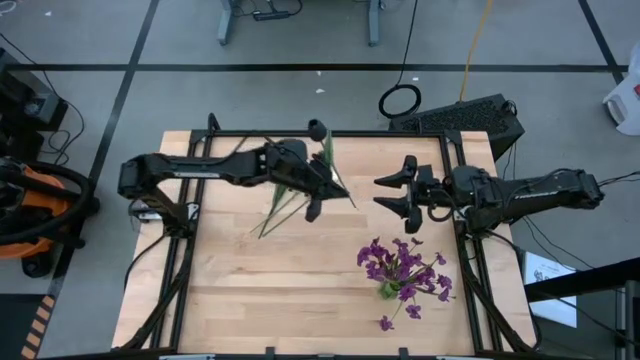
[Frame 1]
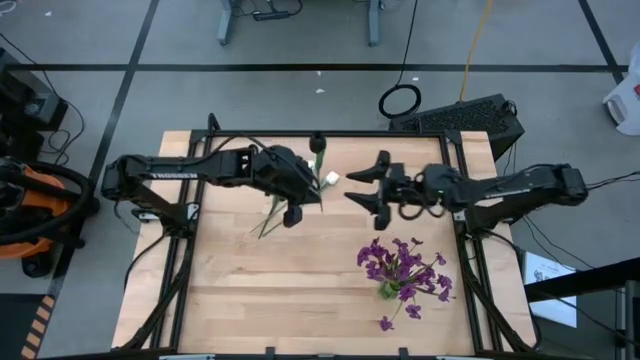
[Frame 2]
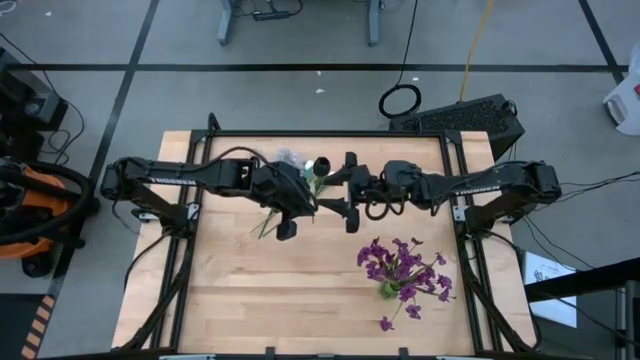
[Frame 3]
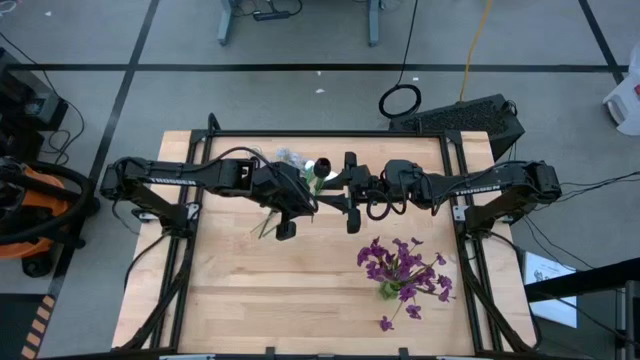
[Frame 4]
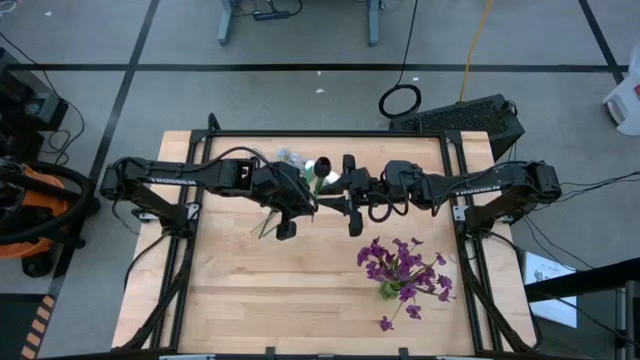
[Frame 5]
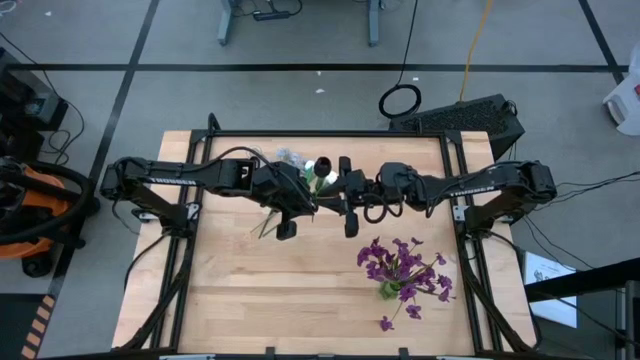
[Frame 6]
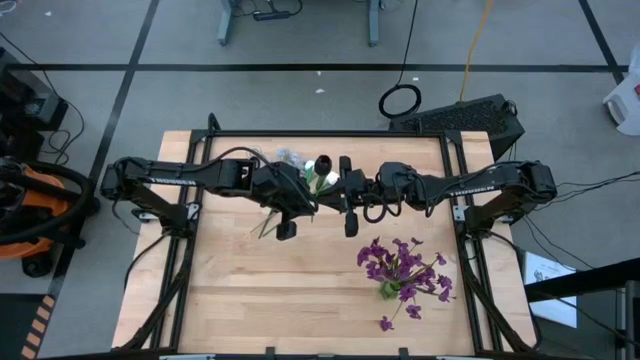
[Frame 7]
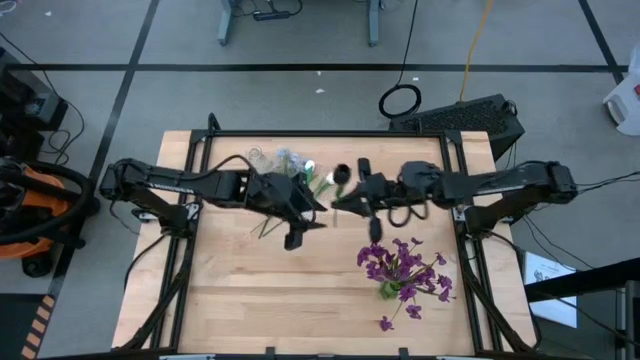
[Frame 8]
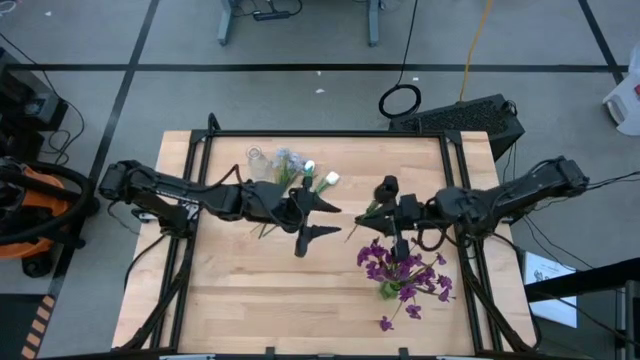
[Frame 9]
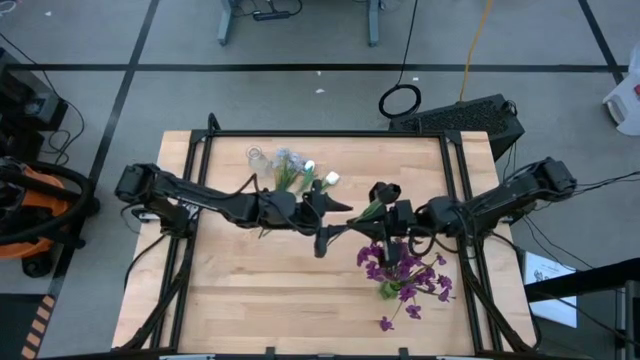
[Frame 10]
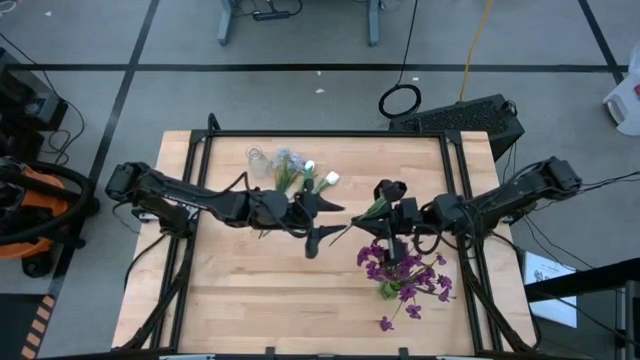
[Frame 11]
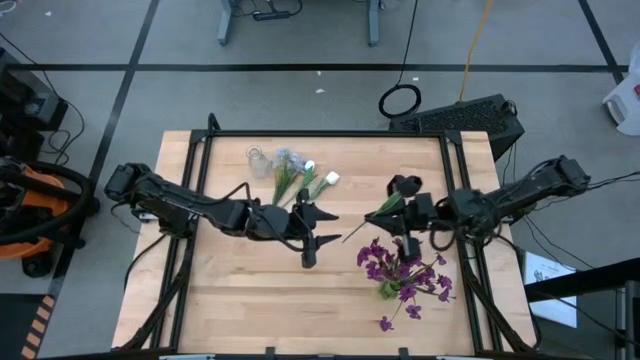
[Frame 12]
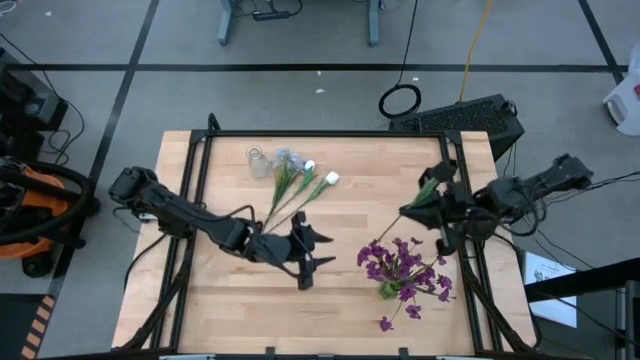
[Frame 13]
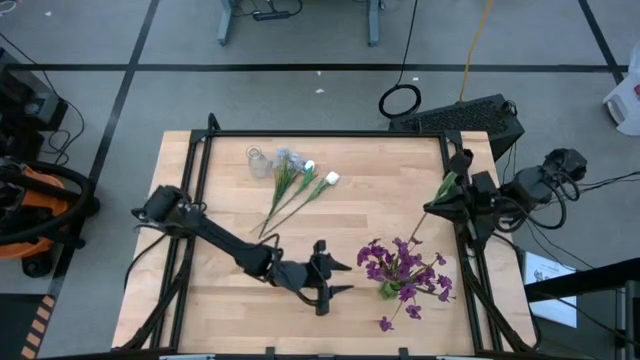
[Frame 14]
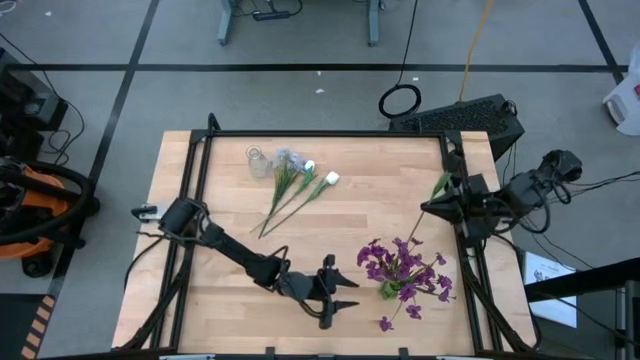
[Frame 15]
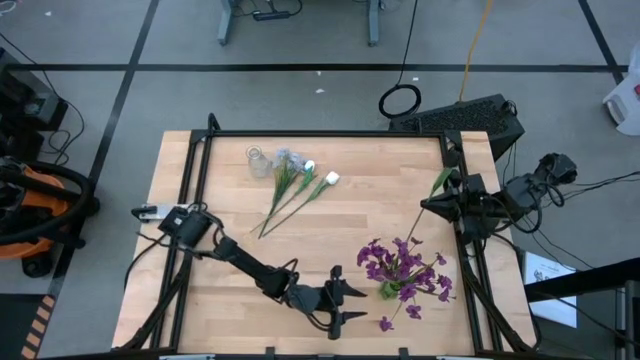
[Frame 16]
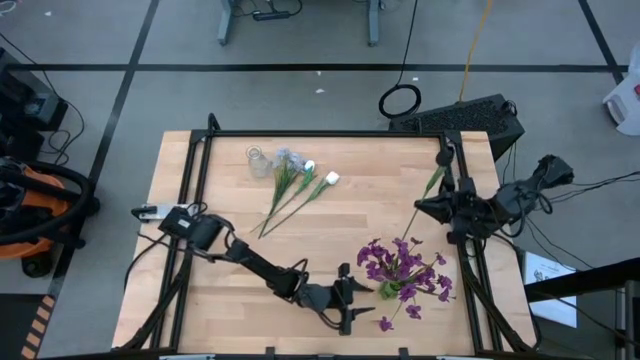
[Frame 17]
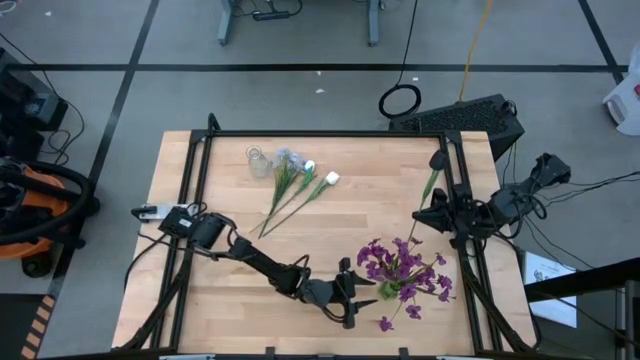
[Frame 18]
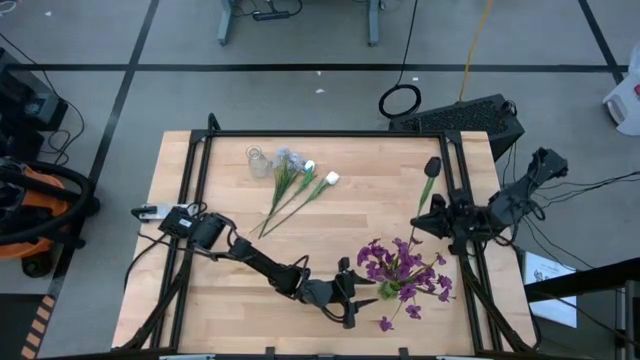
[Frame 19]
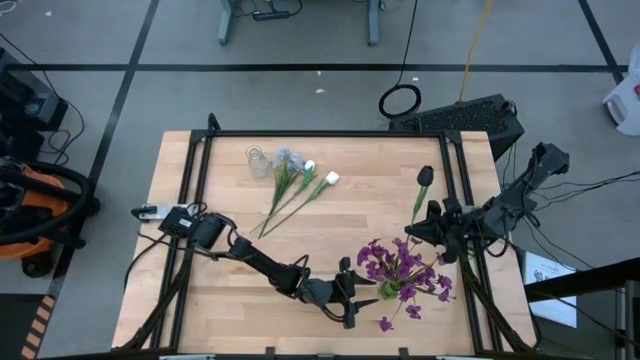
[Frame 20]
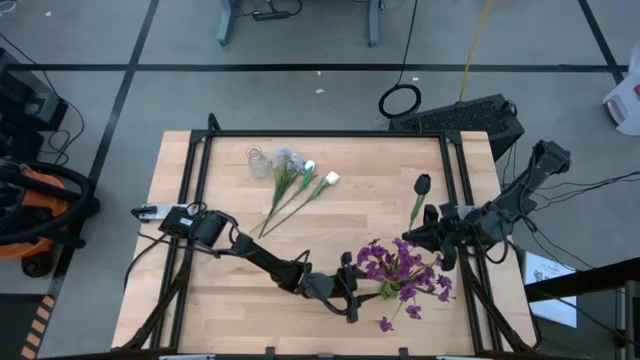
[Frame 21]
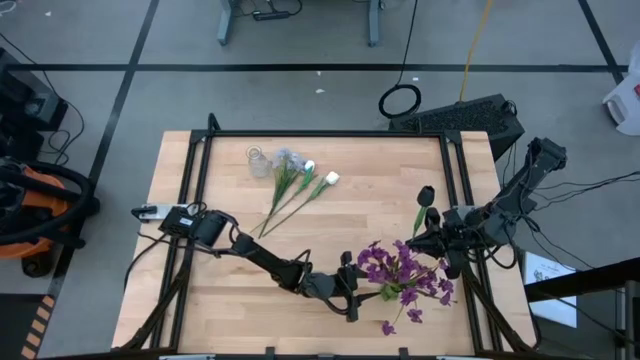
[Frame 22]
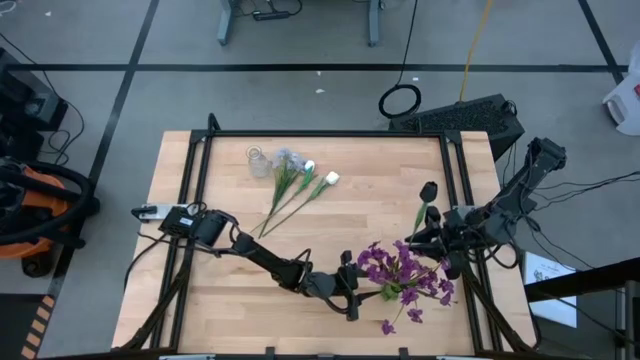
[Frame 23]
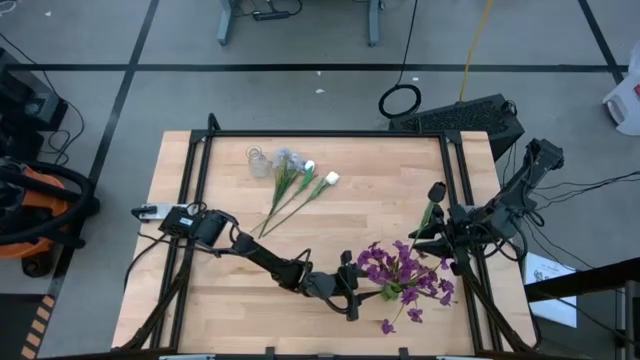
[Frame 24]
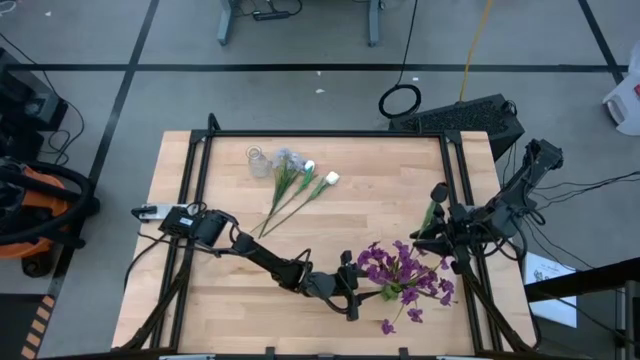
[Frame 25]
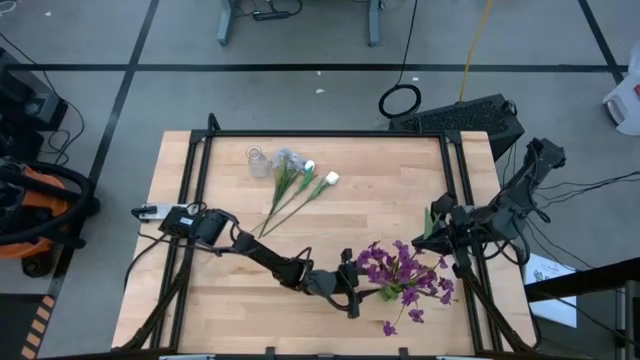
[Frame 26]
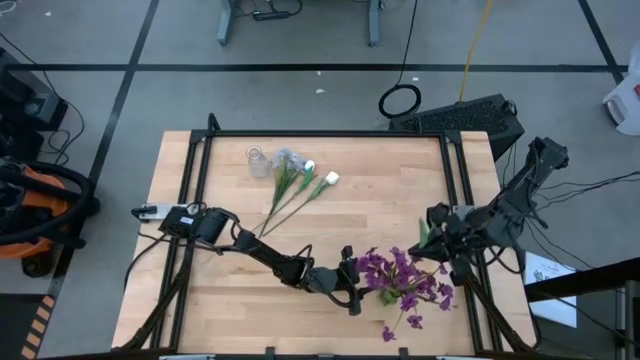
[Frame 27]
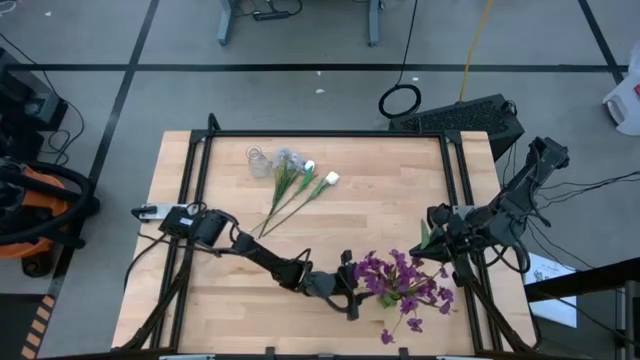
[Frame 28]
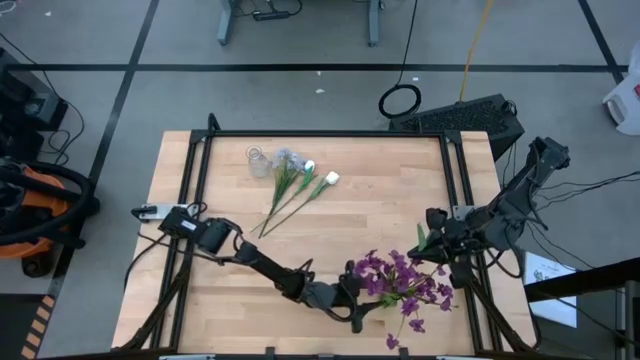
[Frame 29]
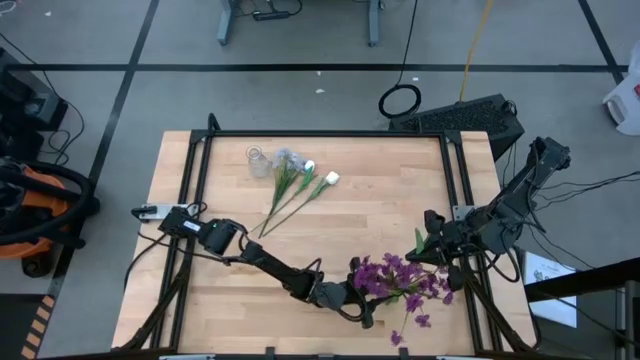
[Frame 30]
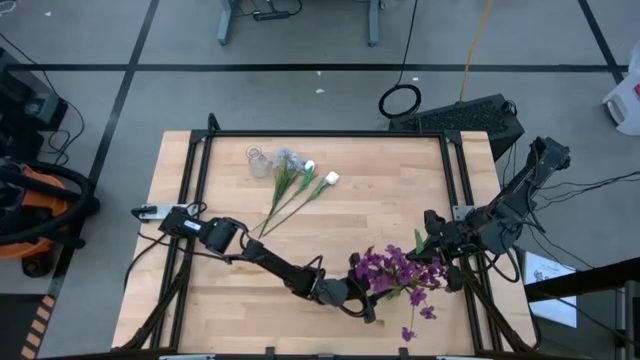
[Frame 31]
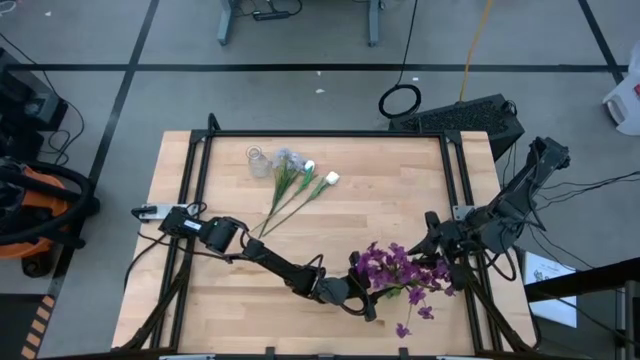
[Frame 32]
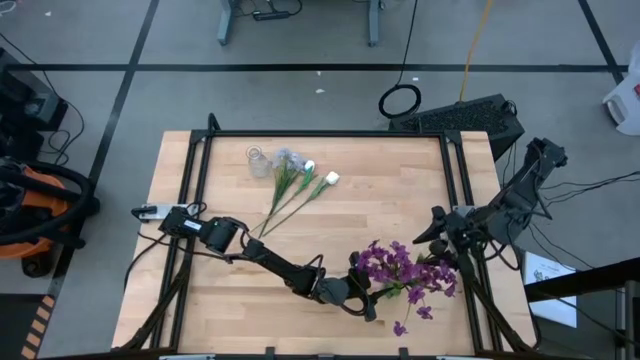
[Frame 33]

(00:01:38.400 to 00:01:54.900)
Task: Sort flowers into vase by color
Put the black tulip into the green vase

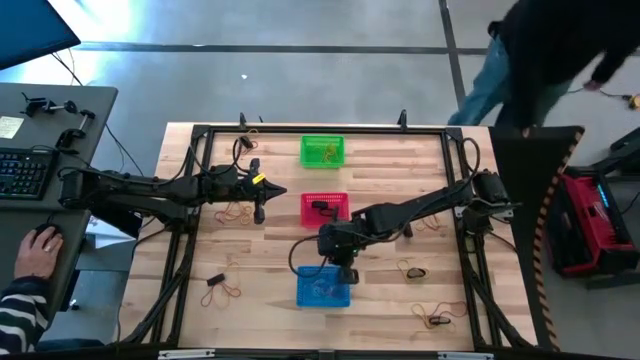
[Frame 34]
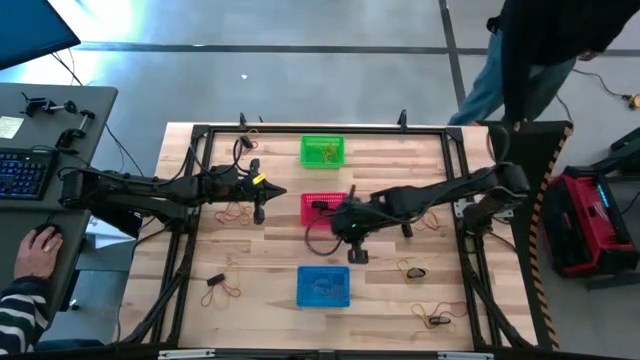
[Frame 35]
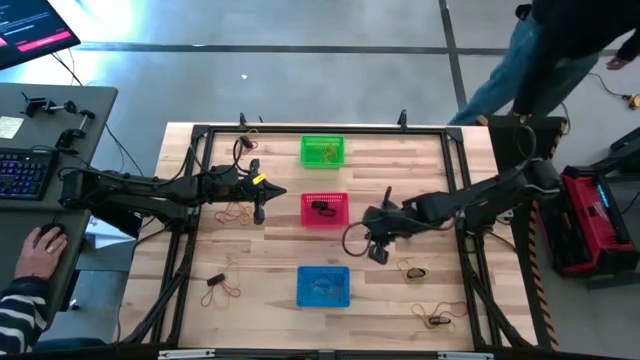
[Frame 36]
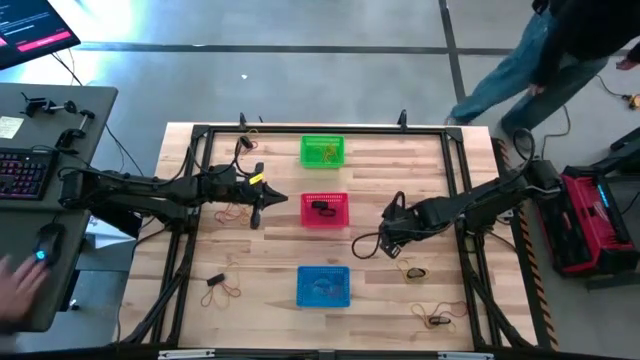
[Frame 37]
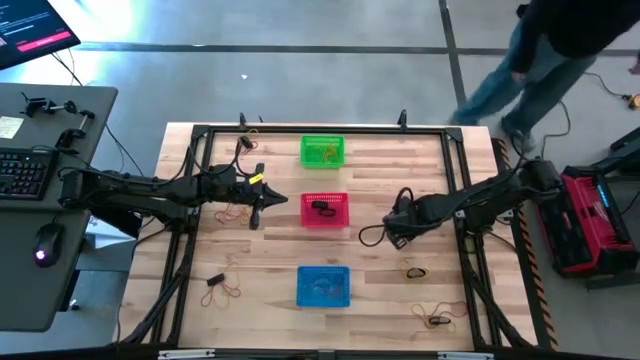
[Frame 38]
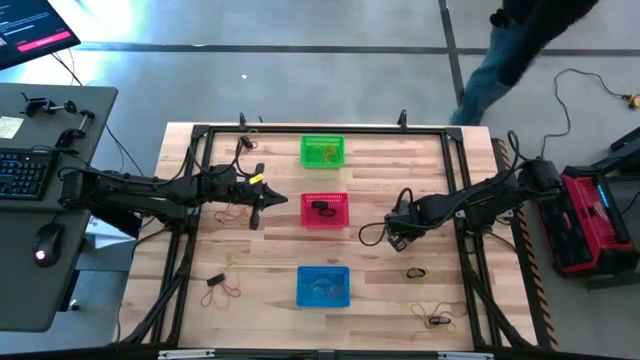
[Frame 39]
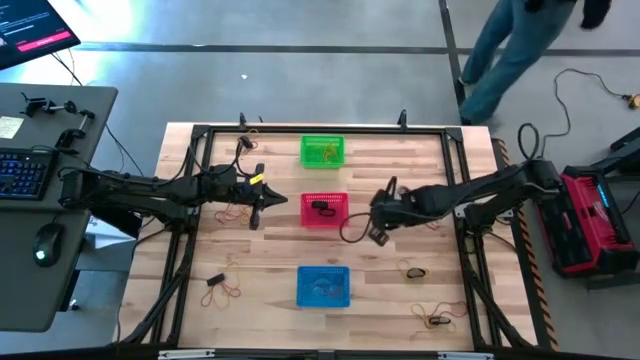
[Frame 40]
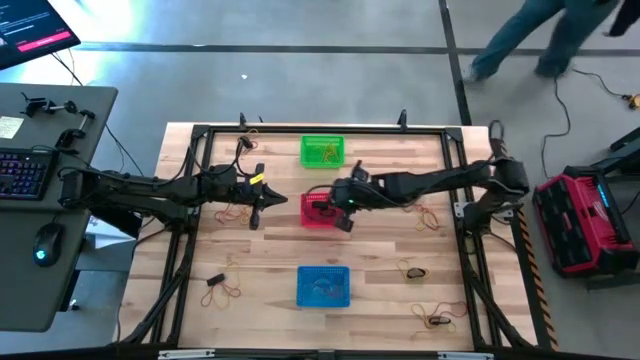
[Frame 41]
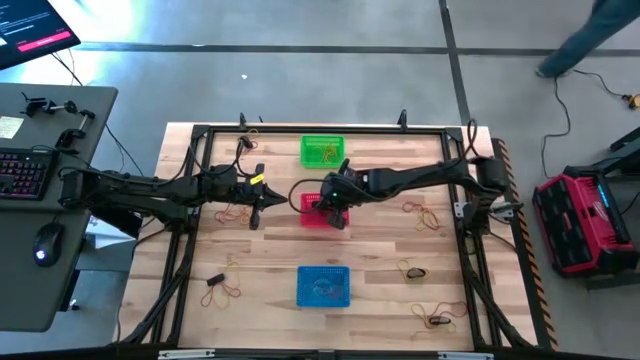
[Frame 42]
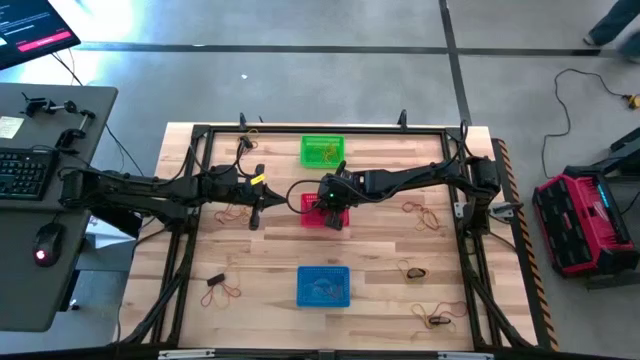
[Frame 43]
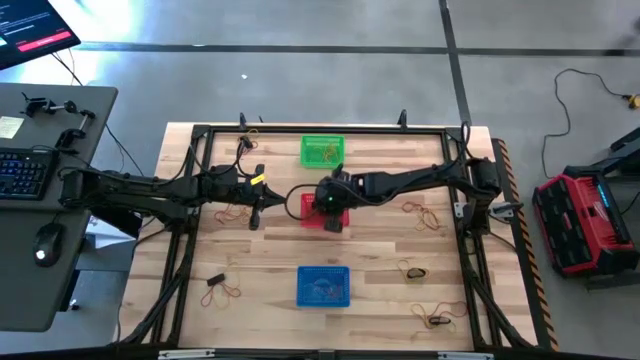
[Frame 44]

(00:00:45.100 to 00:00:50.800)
Task: Sort rubber bands into baskets
Put the black rubber band into the red bin
